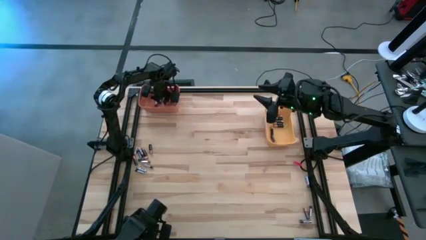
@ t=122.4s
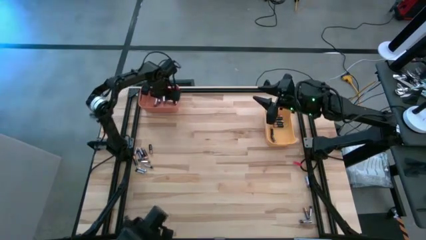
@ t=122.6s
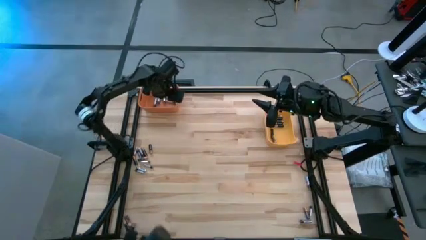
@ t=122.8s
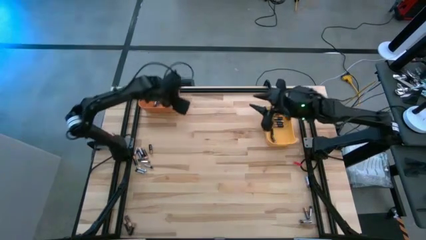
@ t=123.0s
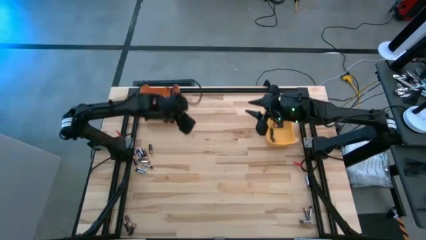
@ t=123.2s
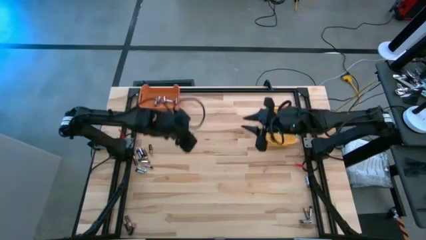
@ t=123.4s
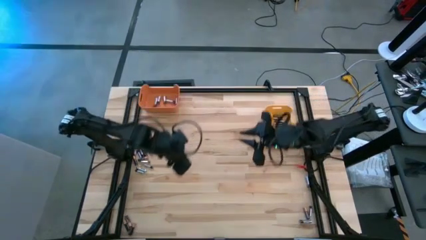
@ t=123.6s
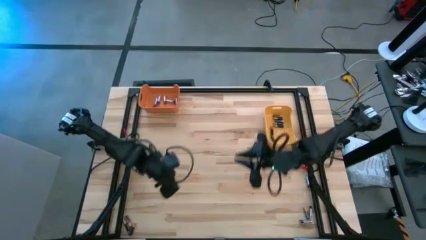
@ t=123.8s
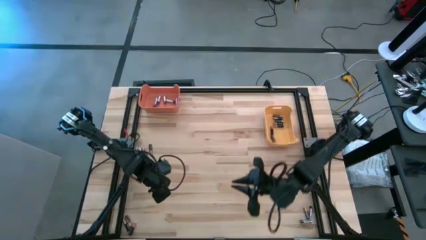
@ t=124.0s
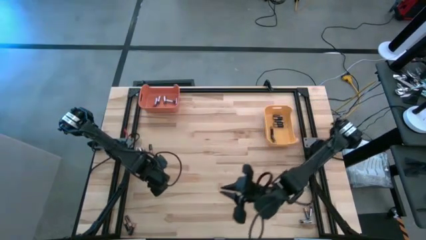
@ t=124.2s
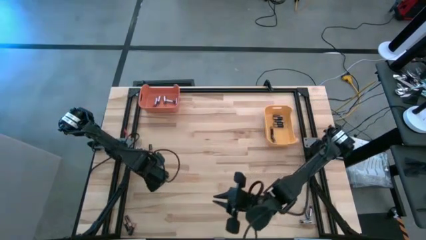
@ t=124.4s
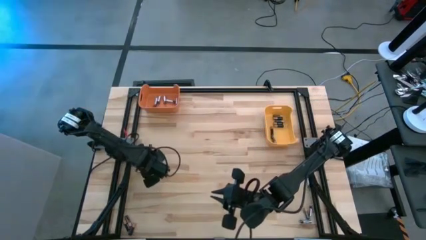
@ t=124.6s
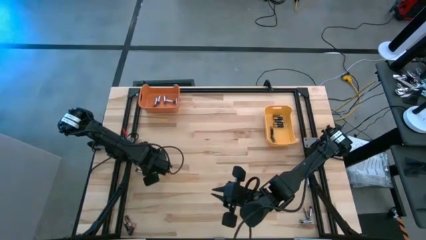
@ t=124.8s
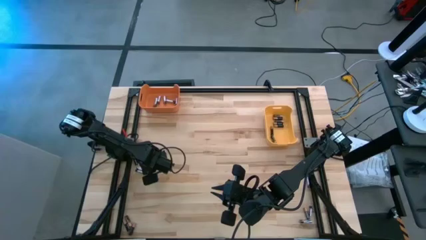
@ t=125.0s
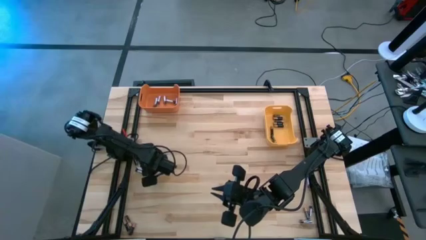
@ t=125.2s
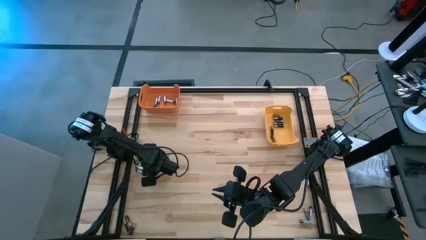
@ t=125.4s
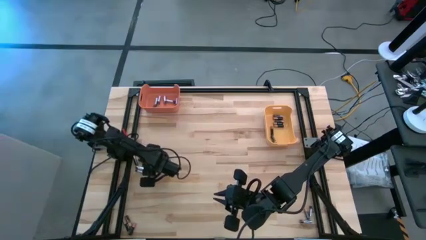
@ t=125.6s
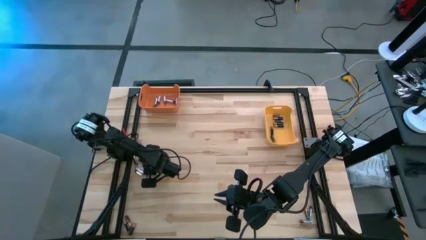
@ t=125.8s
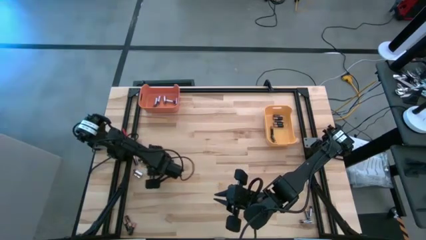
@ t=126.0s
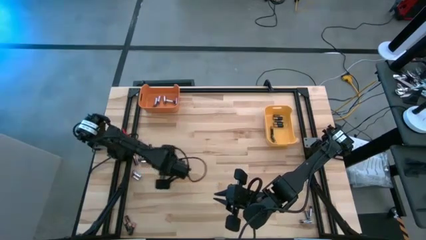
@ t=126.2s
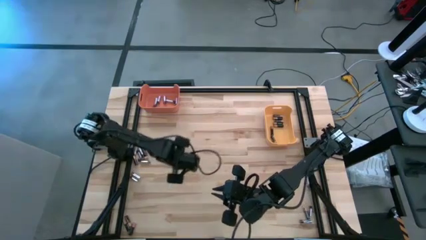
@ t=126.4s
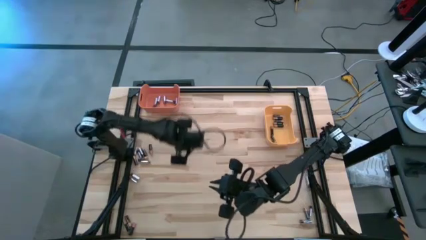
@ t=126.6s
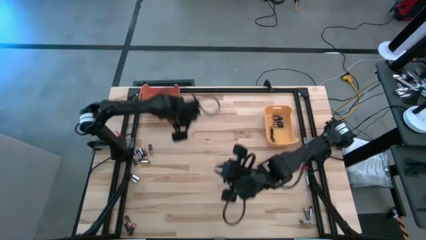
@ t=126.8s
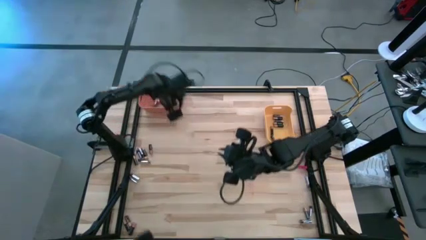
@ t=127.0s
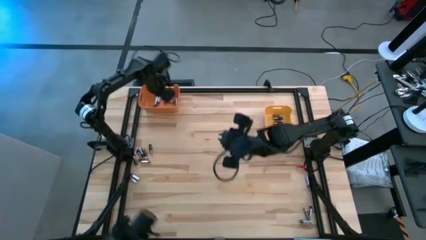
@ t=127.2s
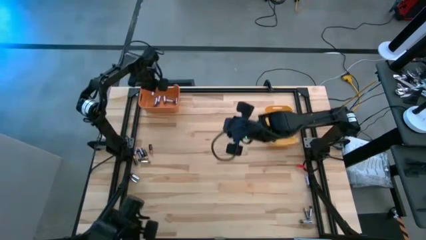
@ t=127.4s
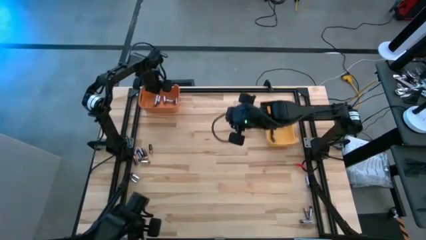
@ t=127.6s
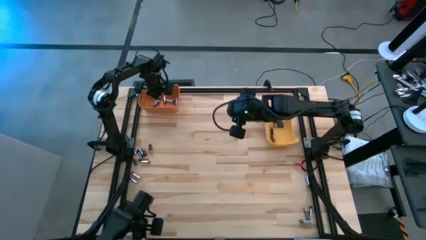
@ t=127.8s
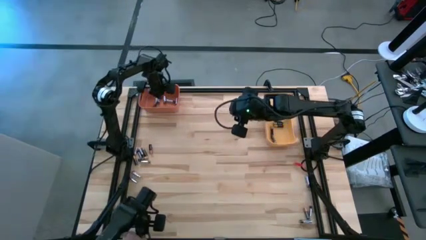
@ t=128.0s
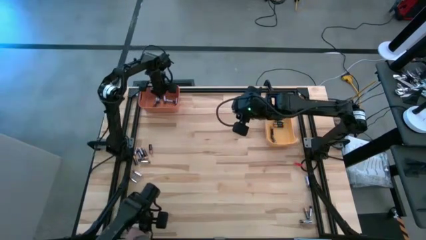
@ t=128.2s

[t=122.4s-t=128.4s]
Task: Sort batteries
Put the silver battery into the orange bin

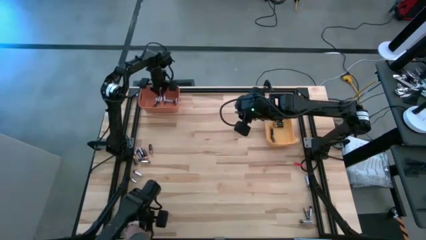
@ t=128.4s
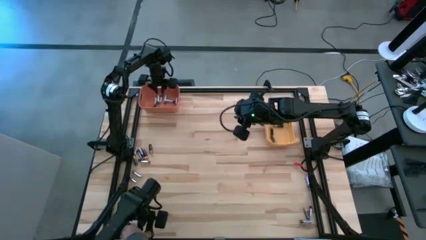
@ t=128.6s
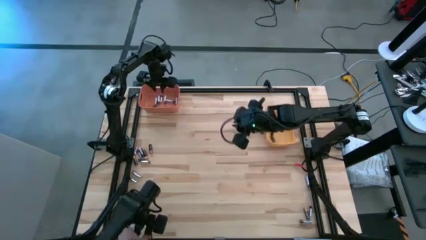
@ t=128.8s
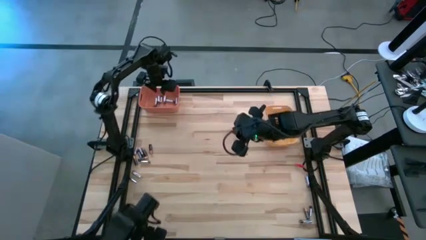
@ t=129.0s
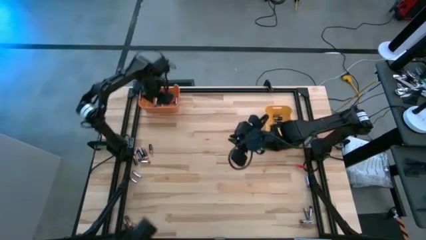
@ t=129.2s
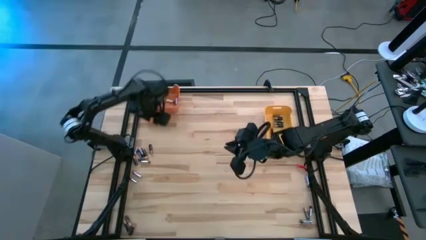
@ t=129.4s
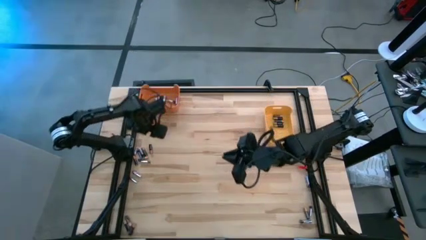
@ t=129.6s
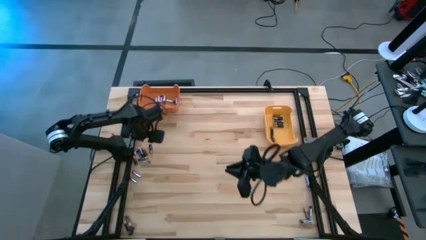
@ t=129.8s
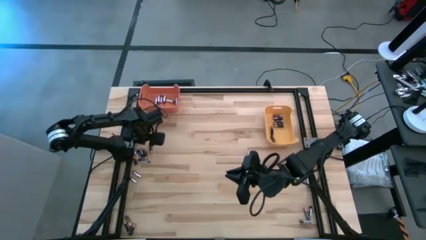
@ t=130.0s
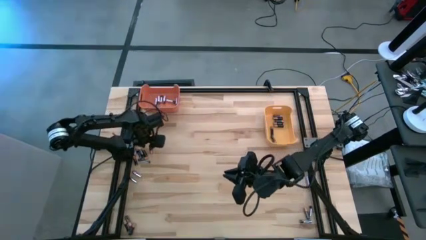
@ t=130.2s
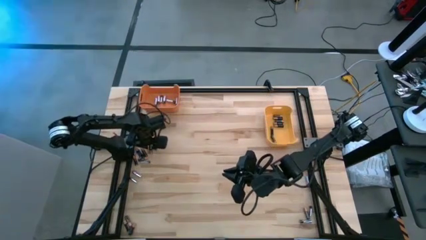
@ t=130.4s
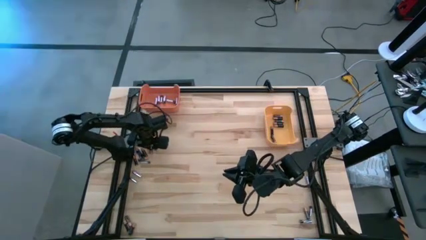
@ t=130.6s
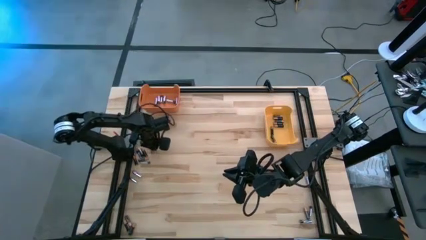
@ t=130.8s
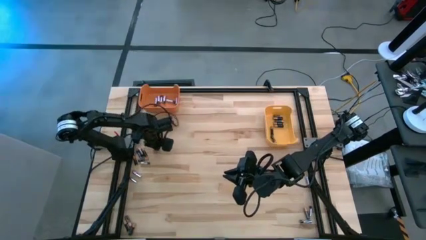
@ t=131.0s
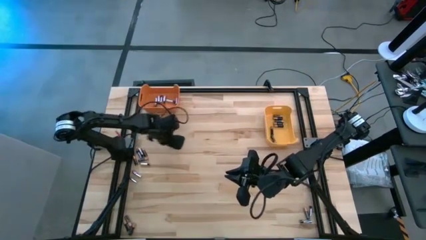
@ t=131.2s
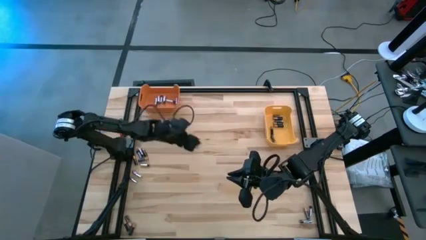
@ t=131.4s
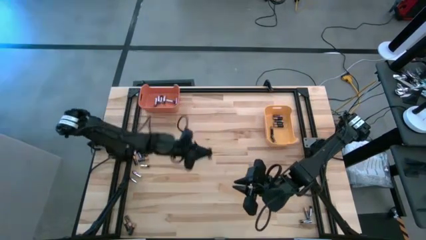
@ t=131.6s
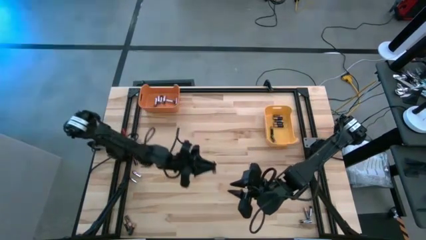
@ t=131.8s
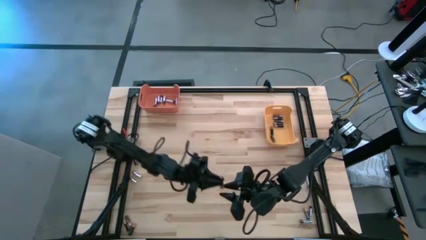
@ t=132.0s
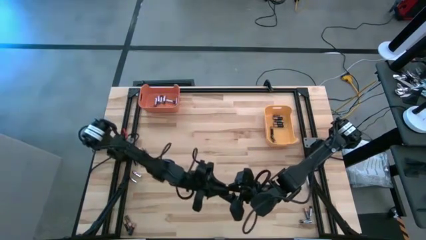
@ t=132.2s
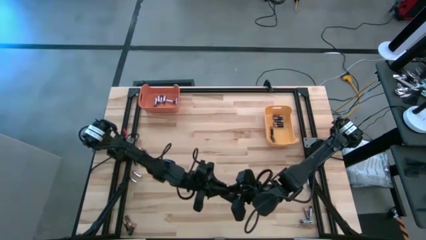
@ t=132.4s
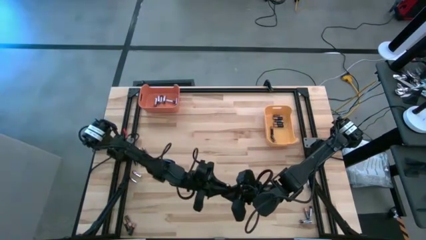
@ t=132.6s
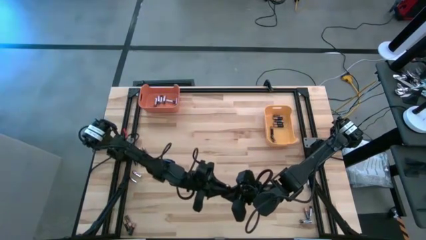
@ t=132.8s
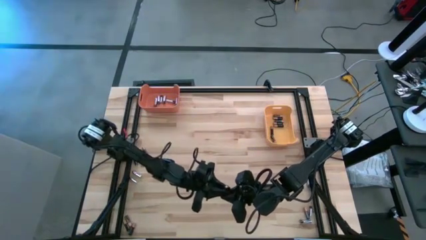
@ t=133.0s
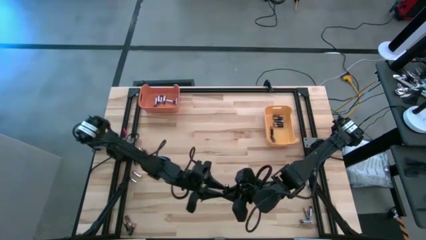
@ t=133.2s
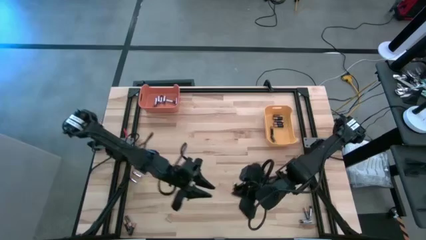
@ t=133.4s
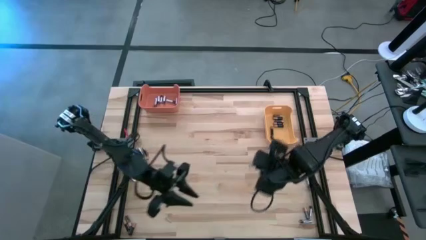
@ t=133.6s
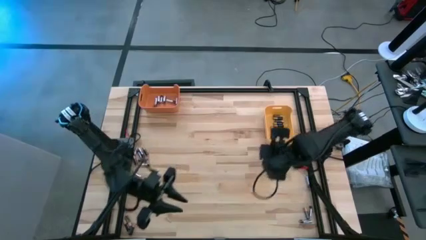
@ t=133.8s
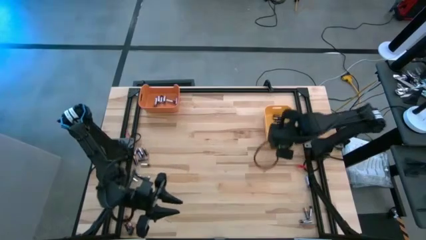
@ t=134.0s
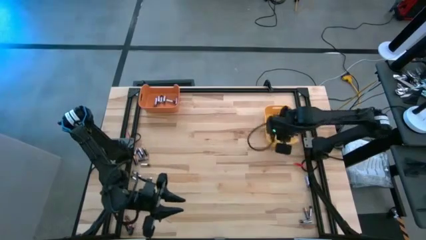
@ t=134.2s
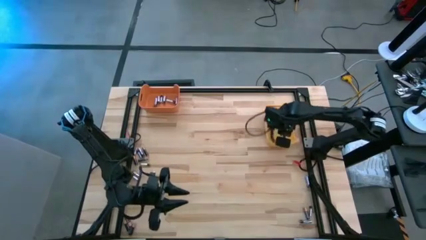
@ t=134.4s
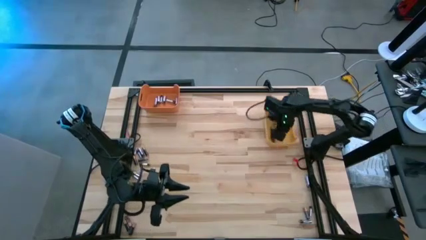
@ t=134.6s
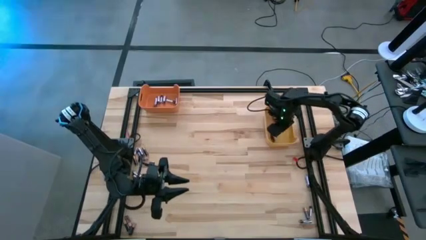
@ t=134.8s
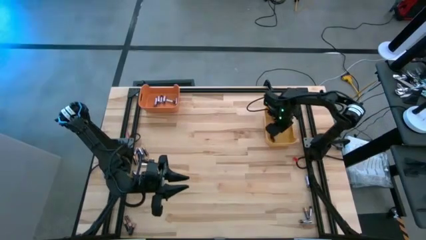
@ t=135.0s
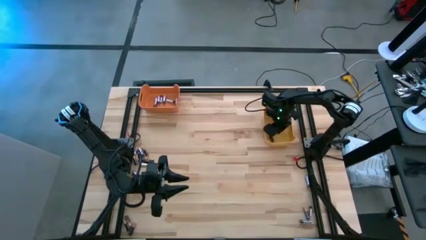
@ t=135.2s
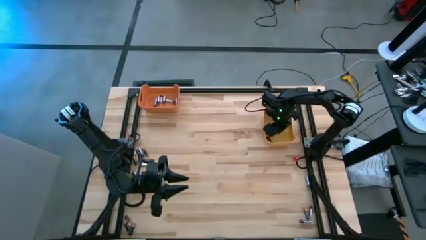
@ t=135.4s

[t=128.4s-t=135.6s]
Put the black battery into the yellow bin

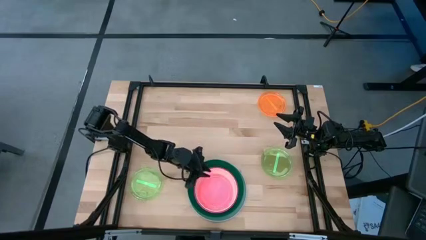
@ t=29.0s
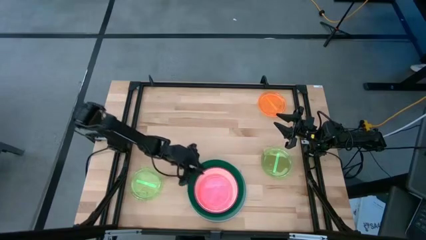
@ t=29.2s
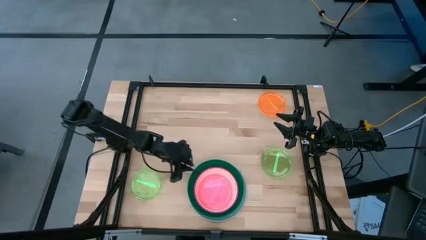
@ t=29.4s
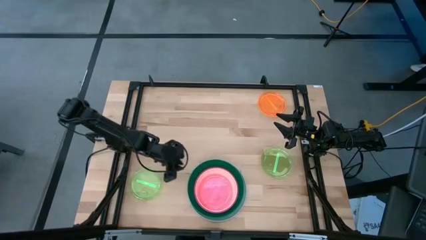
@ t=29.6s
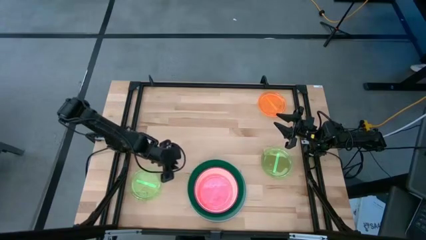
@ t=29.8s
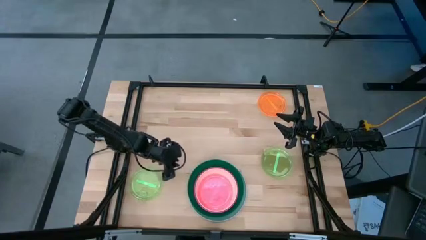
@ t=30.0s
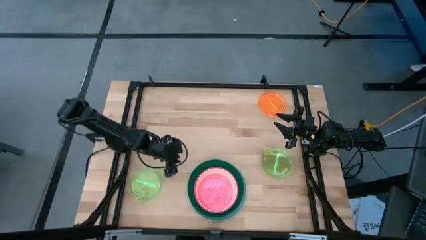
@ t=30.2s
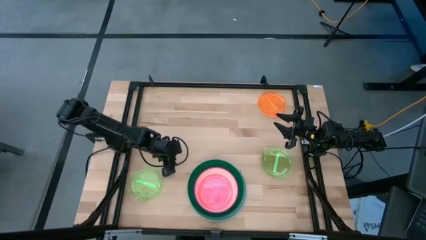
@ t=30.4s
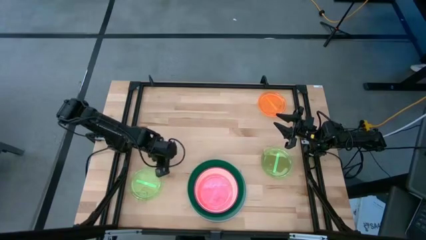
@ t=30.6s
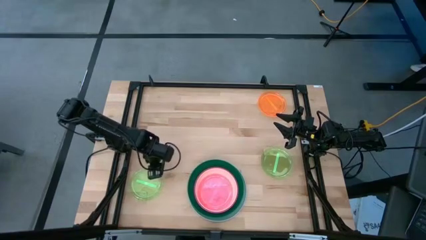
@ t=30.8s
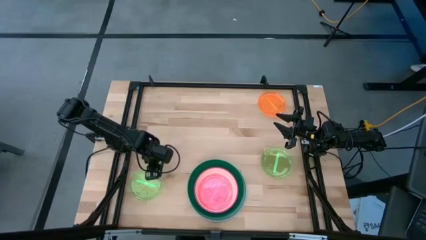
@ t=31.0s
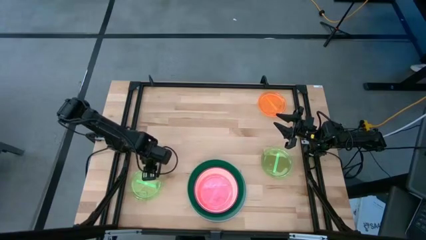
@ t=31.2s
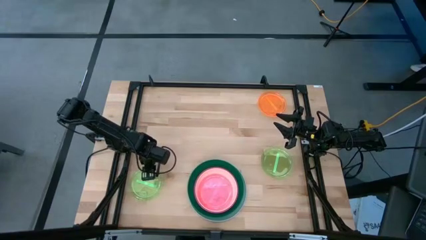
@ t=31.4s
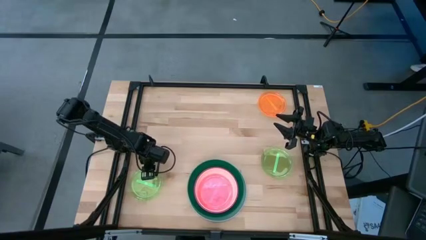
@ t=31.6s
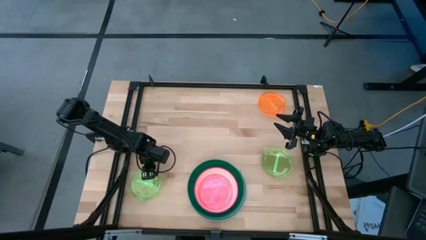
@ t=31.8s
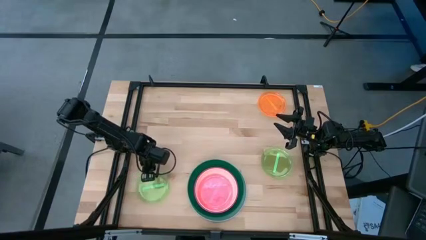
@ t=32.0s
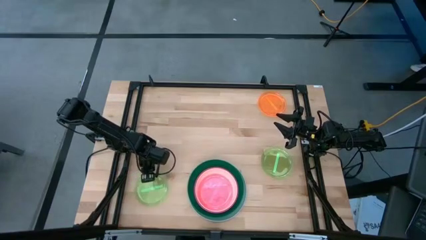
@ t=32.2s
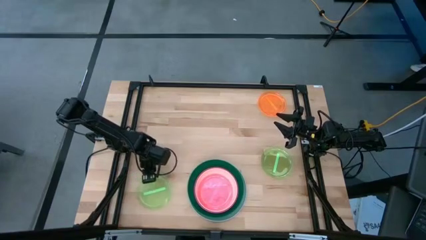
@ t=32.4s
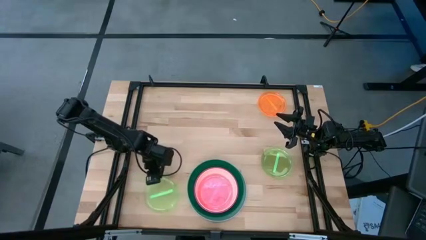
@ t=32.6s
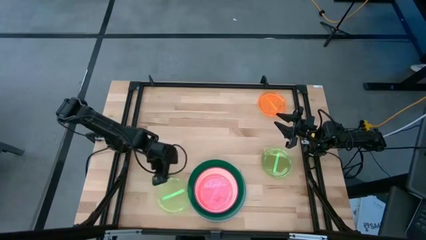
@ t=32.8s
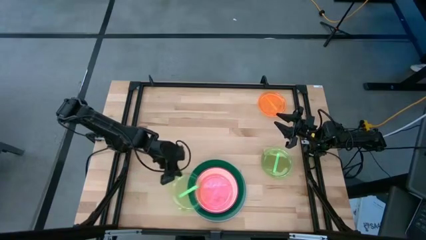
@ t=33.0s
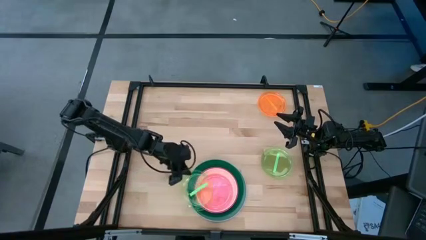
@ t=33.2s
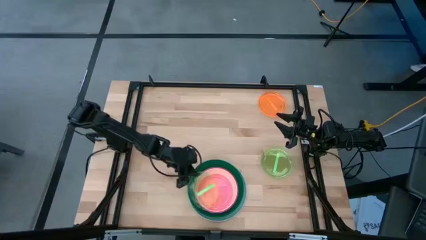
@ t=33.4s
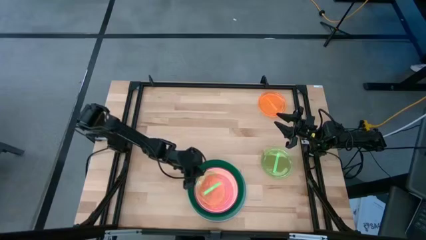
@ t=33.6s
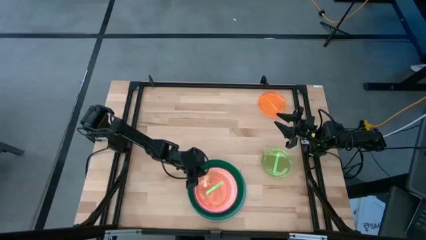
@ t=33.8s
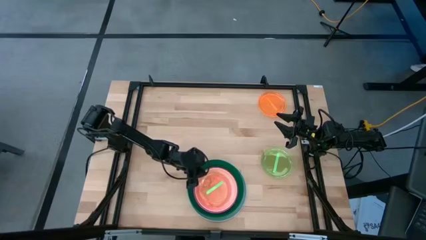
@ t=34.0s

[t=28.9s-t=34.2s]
Task: Stack plastic plates
Stack the left transparent green plate on the transparent pink plate
